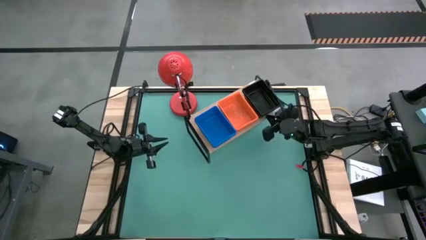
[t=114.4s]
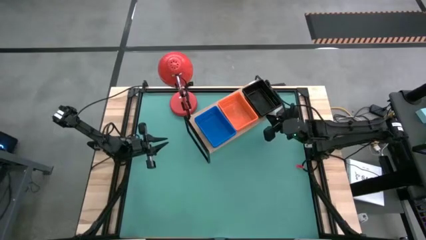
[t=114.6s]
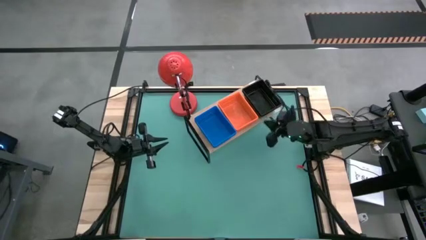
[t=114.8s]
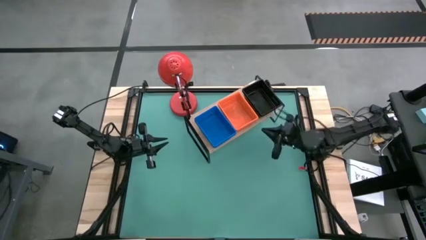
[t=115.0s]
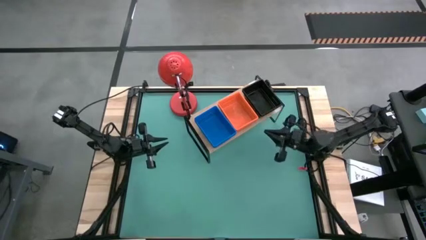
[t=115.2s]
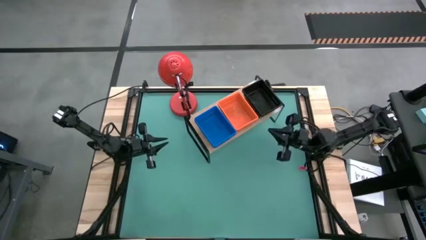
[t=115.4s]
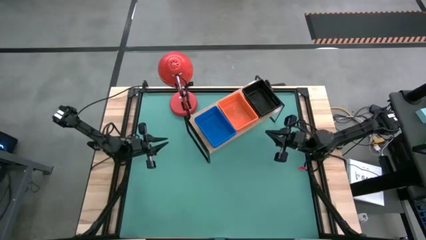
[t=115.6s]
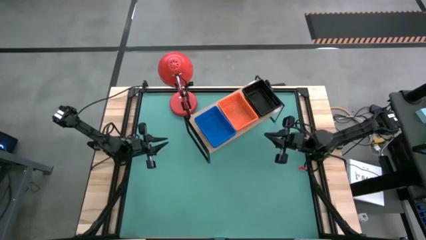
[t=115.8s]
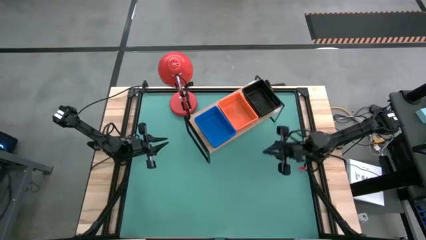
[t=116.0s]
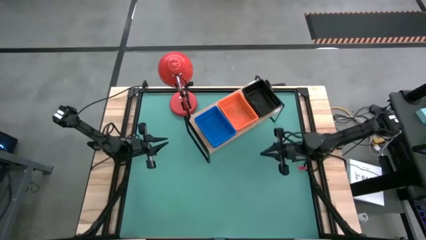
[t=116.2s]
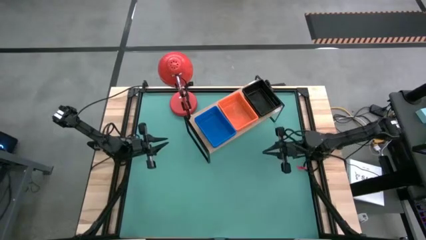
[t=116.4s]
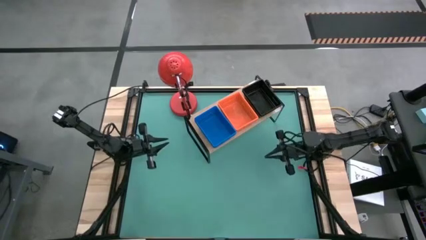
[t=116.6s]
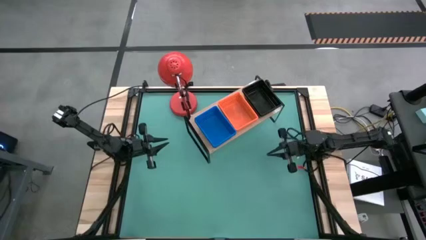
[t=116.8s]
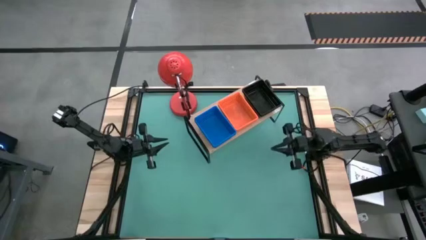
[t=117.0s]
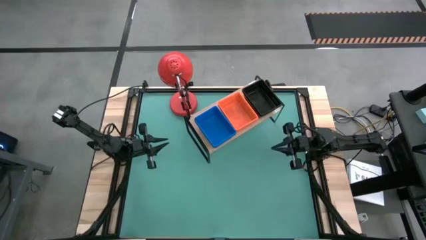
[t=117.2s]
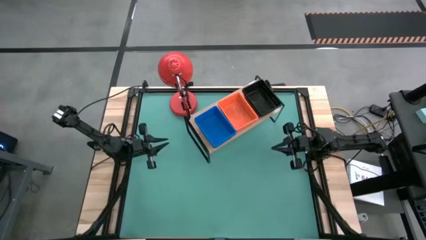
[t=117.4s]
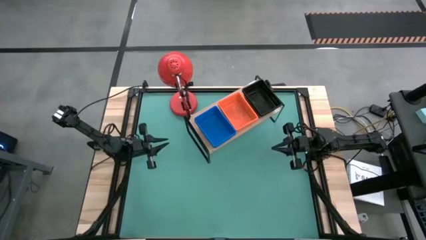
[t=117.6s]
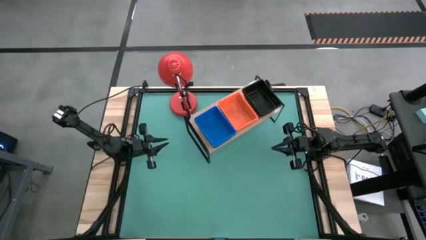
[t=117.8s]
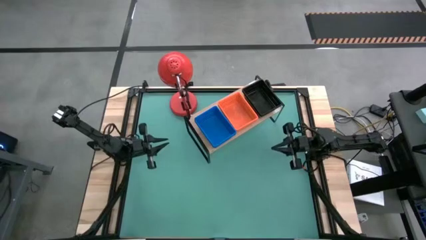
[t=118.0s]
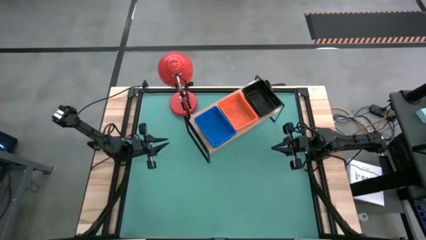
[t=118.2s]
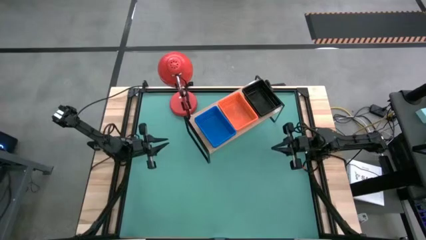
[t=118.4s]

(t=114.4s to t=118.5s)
Task: Stack baskets on shelf by color
Return to Home Position

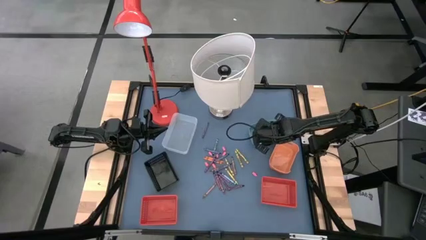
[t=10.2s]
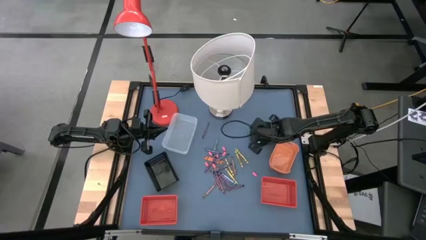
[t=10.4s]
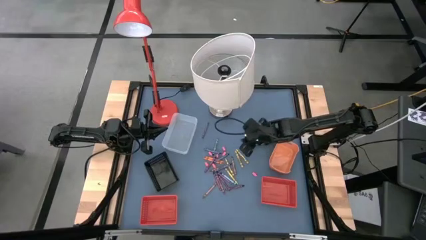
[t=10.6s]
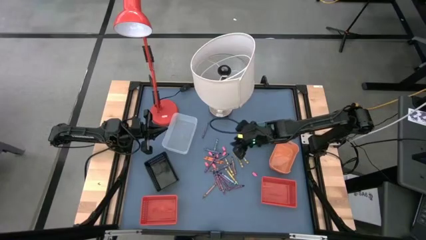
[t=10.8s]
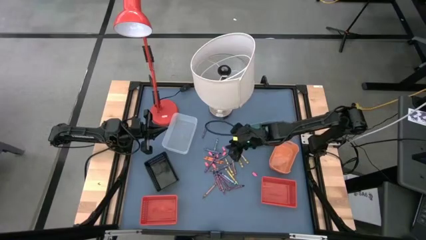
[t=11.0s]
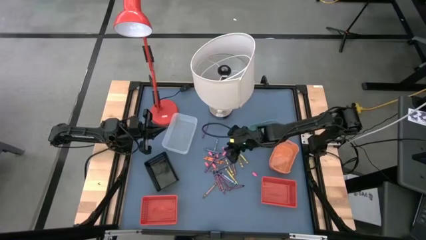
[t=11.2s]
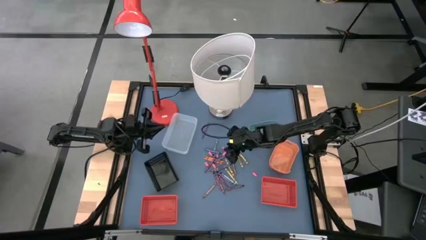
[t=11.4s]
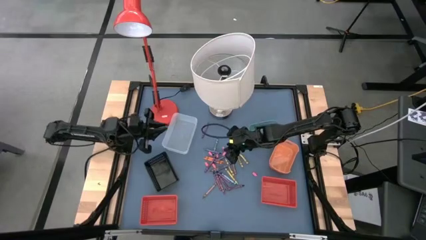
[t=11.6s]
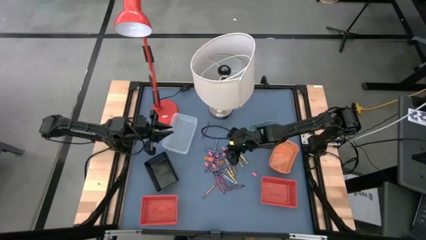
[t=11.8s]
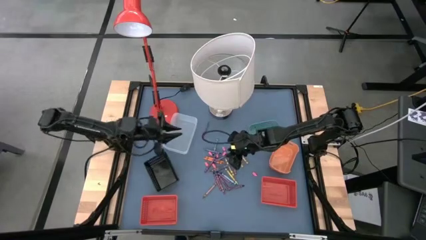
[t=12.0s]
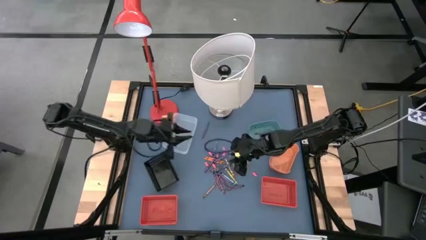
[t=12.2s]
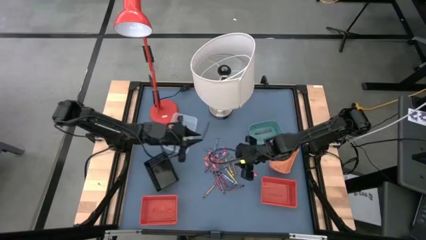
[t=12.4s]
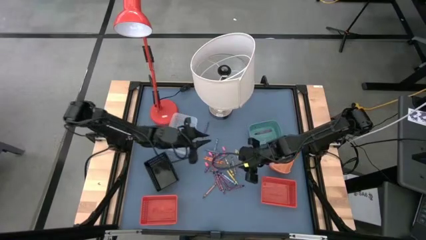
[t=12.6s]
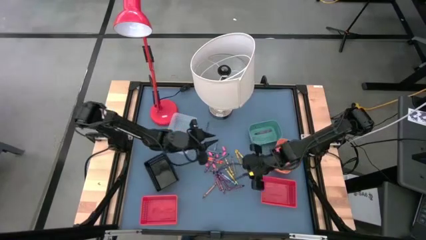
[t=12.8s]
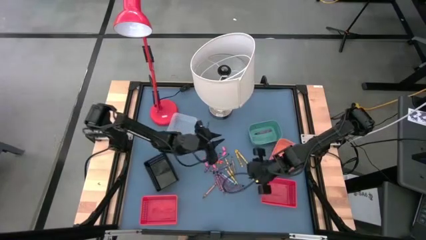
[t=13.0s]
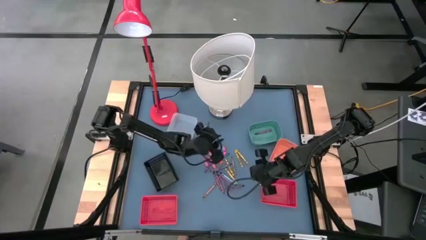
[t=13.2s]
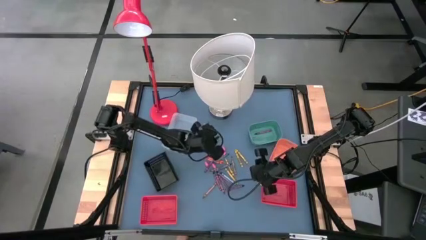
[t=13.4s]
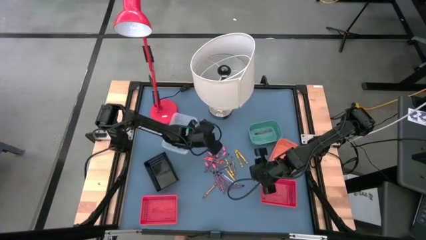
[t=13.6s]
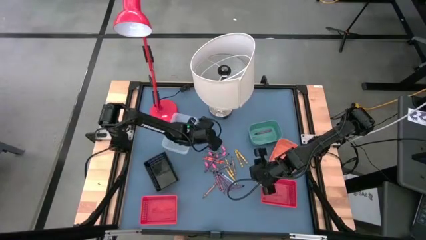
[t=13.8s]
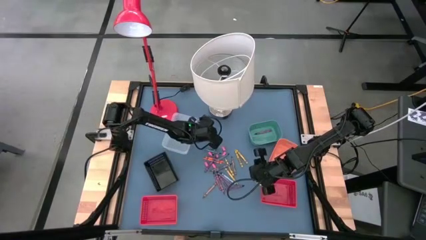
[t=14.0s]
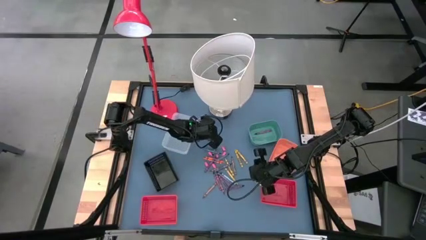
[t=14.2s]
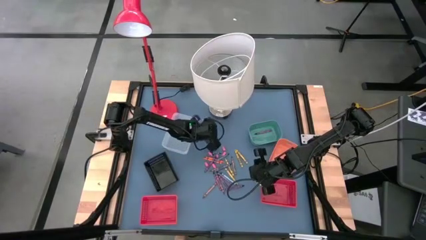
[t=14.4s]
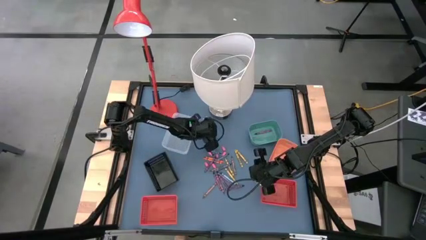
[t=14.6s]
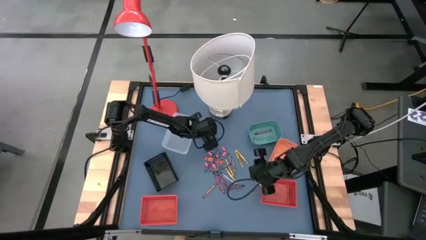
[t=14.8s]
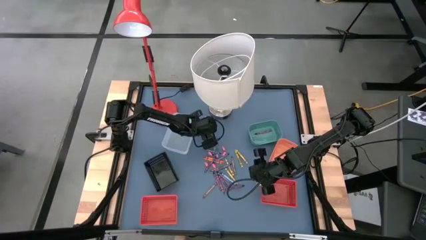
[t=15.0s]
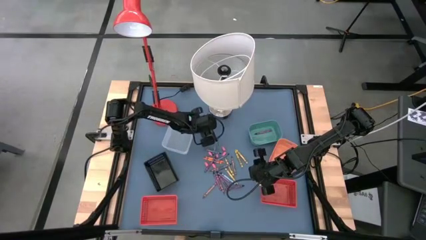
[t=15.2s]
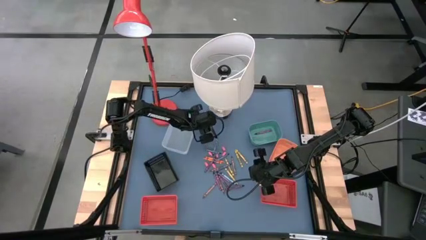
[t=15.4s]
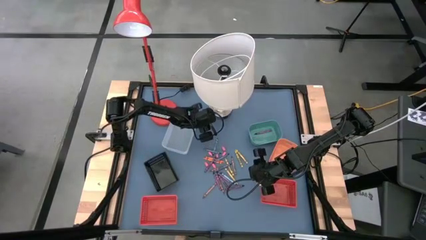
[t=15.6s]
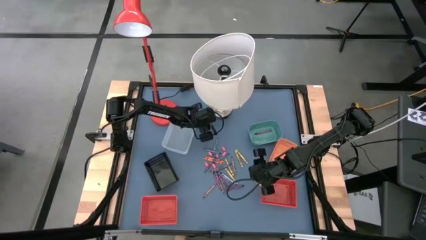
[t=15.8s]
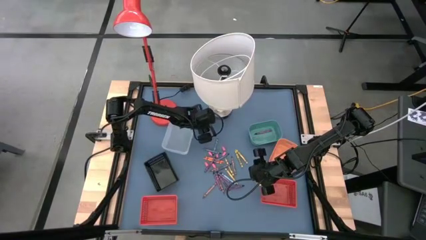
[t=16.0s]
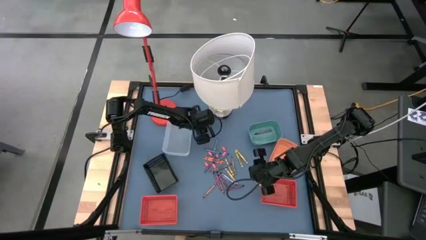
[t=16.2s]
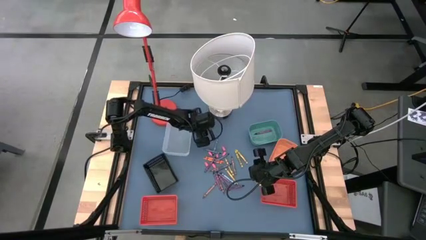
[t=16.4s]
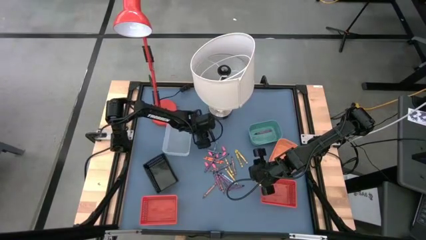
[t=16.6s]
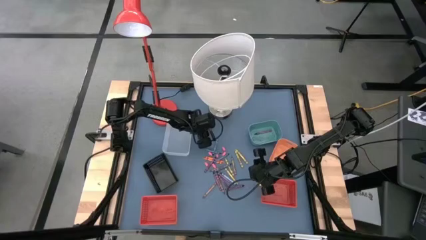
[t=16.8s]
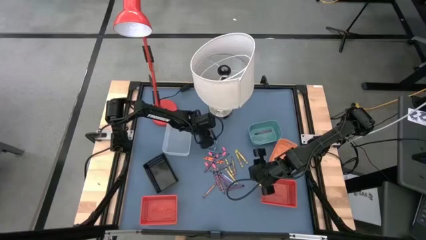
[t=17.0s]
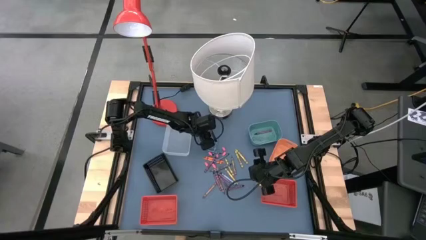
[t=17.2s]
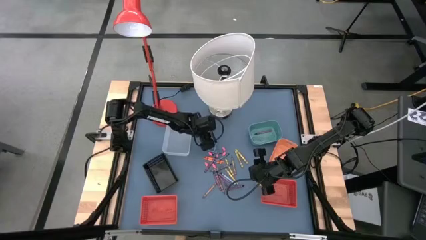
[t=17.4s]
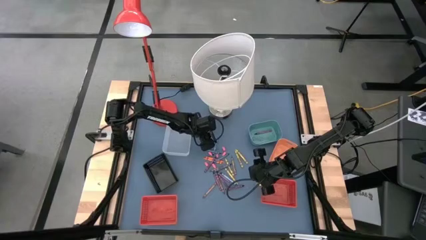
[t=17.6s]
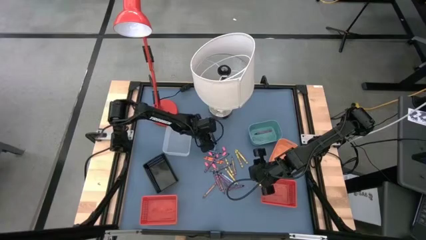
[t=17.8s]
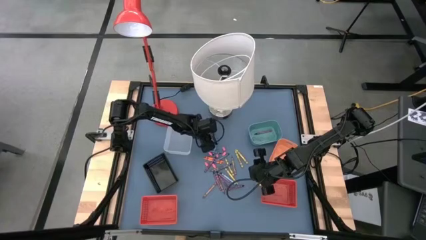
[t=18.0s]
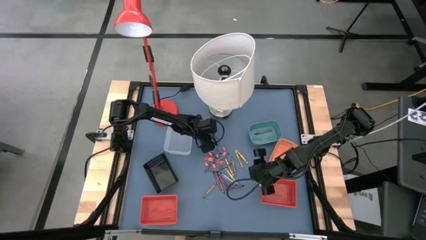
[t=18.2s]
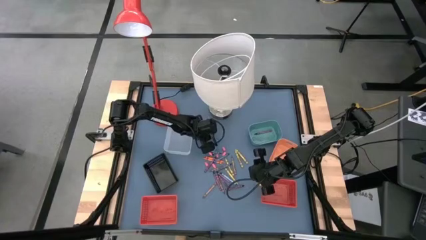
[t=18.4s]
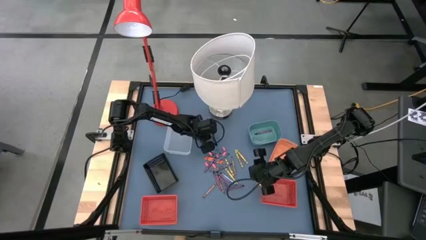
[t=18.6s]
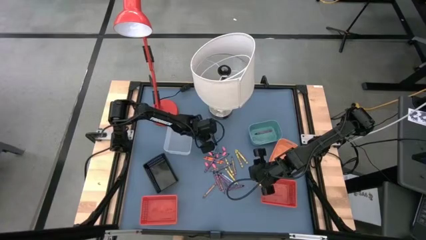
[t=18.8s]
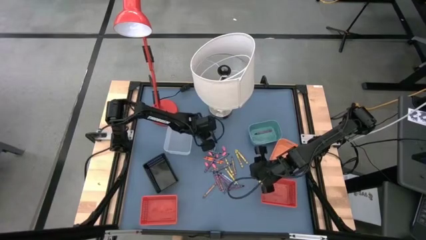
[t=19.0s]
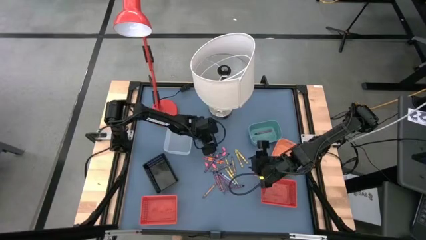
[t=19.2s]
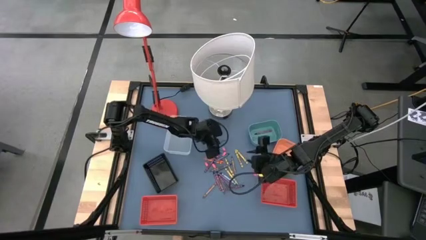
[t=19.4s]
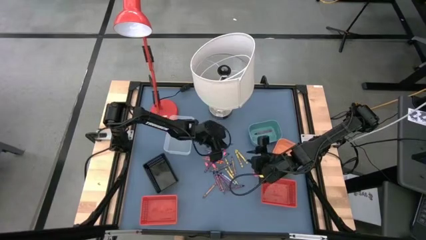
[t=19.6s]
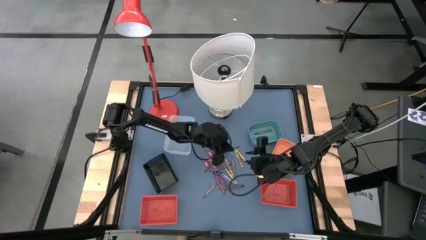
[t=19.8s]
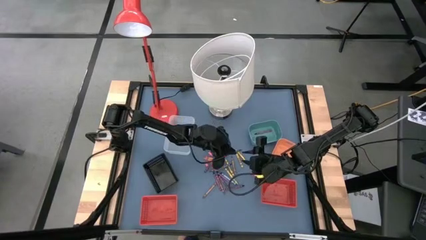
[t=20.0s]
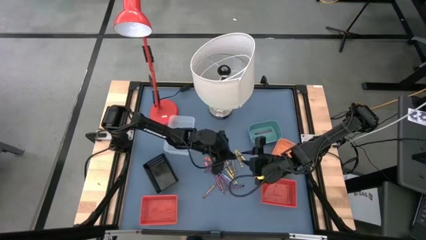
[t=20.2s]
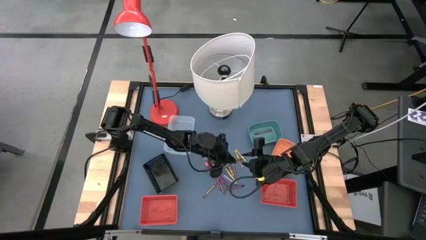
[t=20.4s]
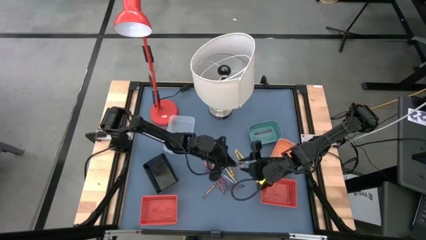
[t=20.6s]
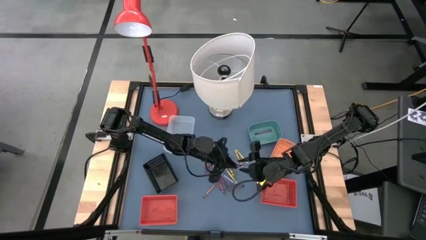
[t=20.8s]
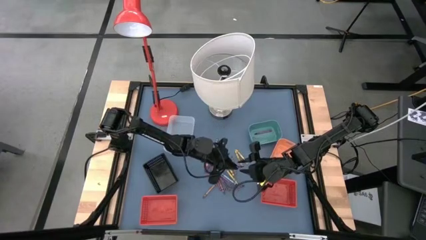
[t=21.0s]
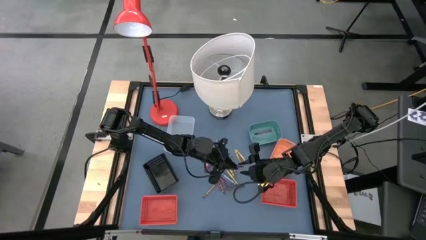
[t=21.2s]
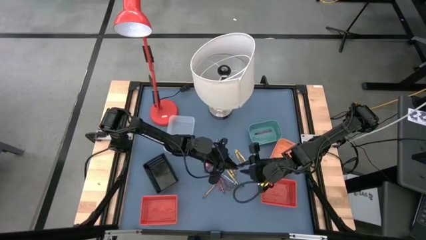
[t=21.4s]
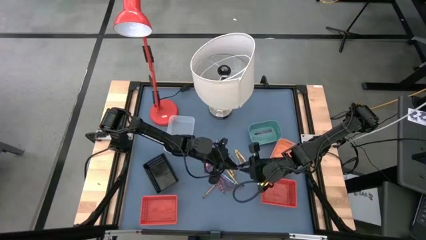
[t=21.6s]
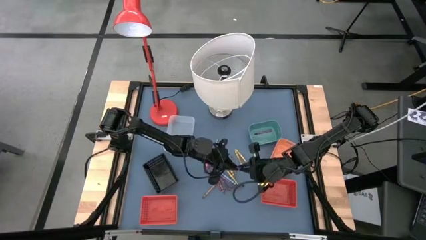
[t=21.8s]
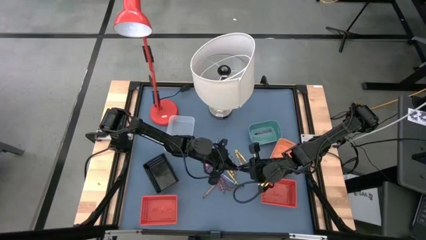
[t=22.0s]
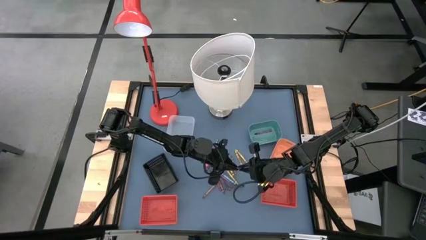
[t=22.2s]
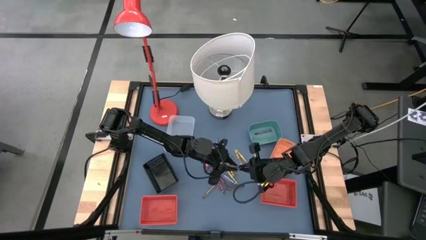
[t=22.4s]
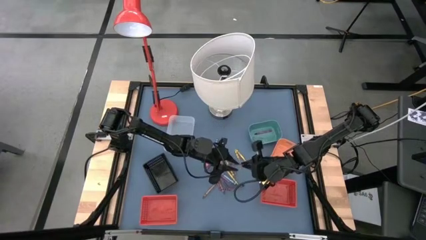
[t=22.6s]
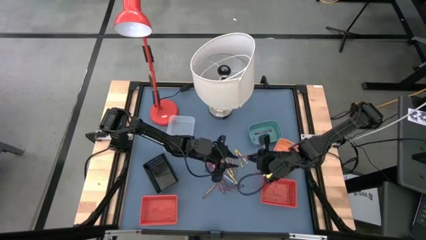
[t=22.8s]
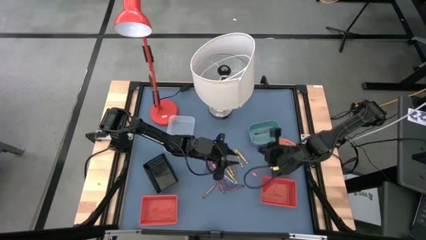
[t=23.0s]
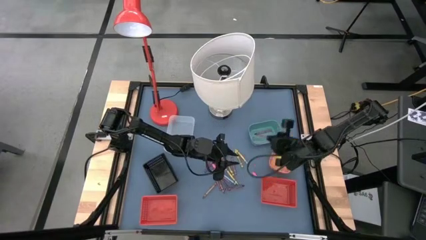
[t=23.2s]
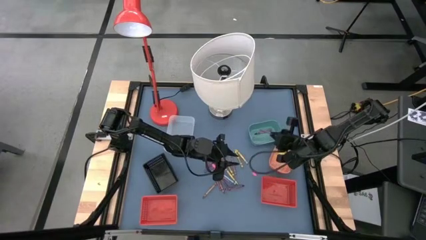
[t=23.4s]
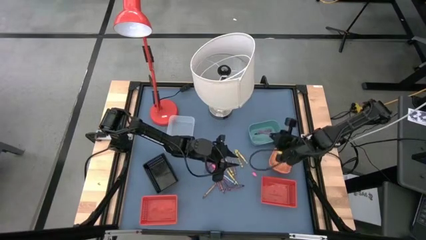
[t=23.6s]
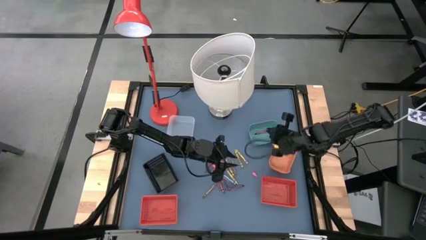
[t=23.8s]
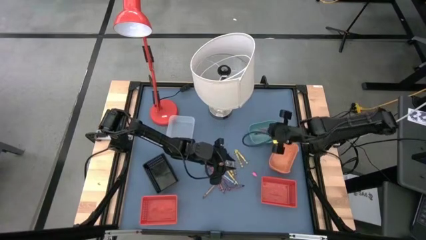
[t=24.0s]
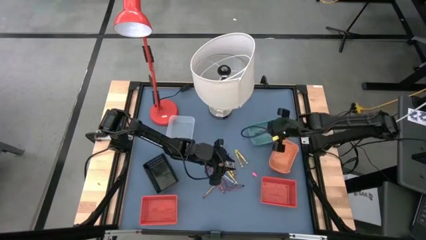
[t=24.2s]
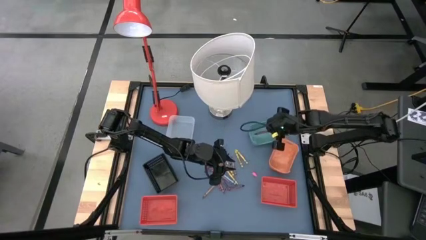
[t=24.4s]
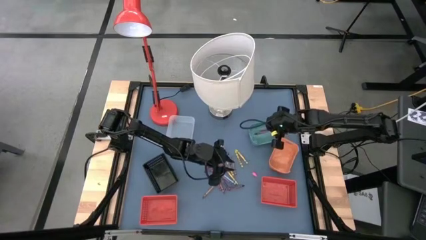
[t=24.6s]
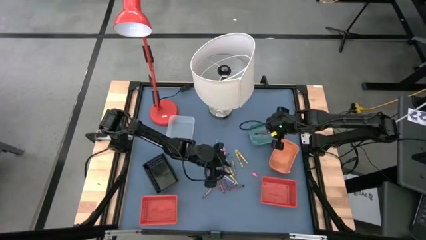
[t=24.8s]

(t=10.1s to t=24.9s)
Task: Sort crayons
Put the violet crayon into the green bin
